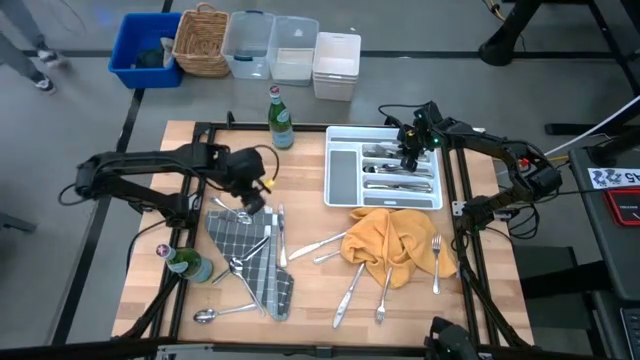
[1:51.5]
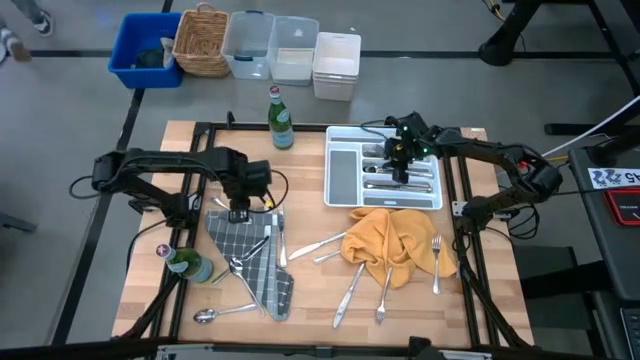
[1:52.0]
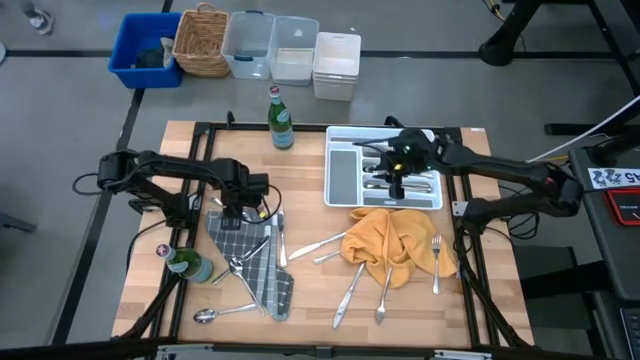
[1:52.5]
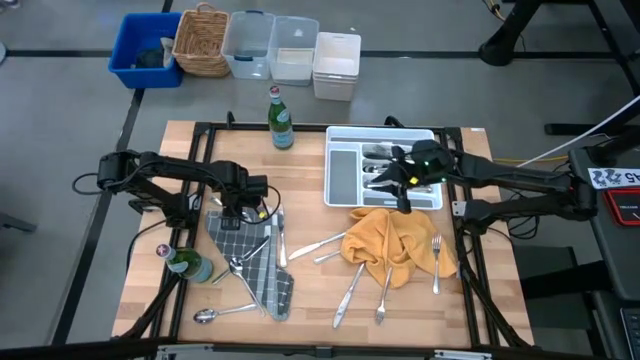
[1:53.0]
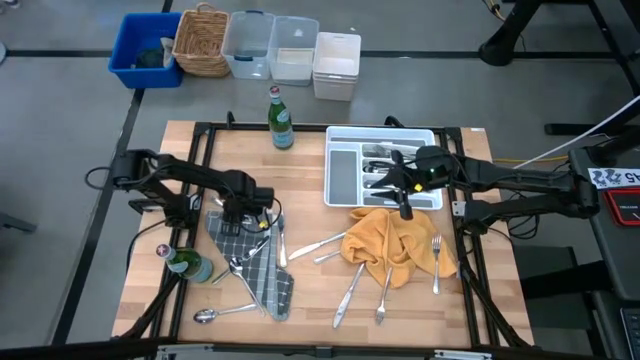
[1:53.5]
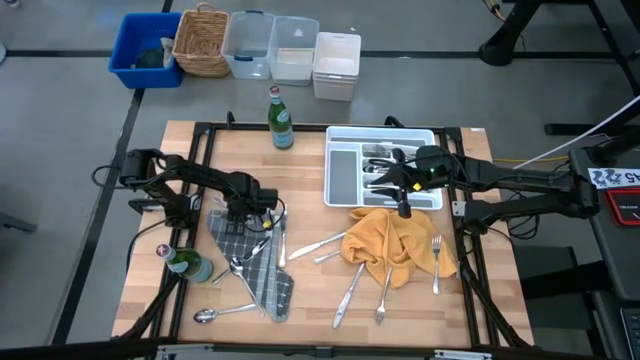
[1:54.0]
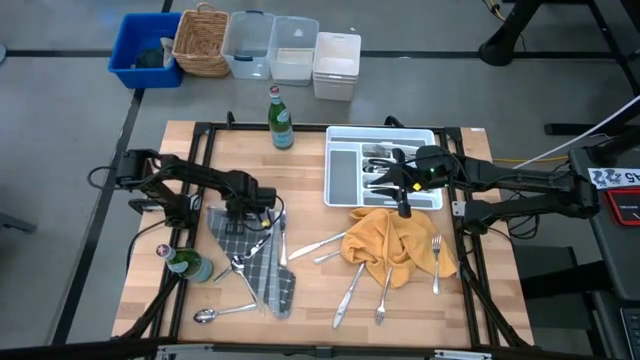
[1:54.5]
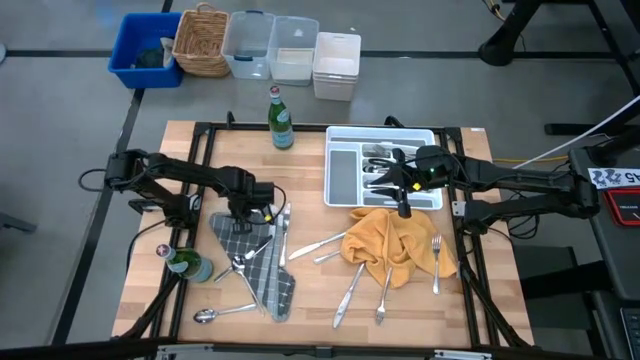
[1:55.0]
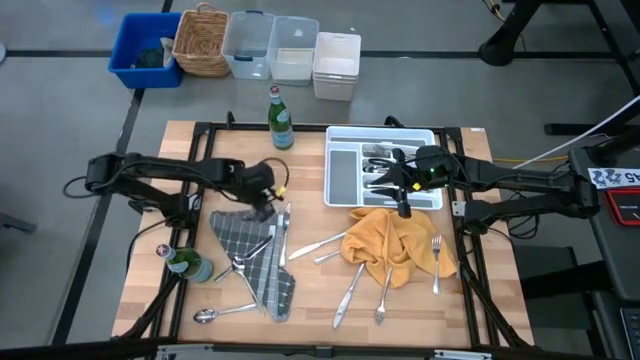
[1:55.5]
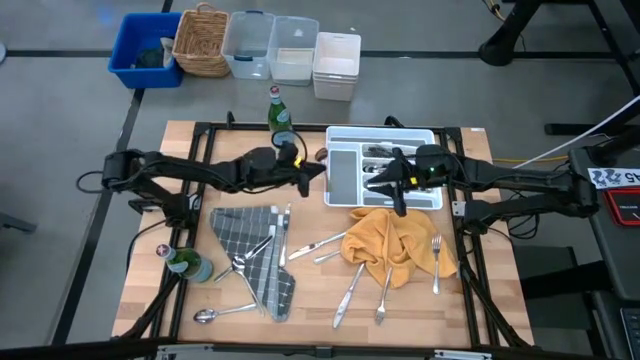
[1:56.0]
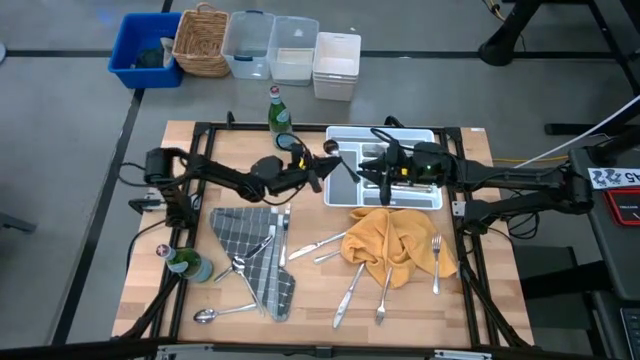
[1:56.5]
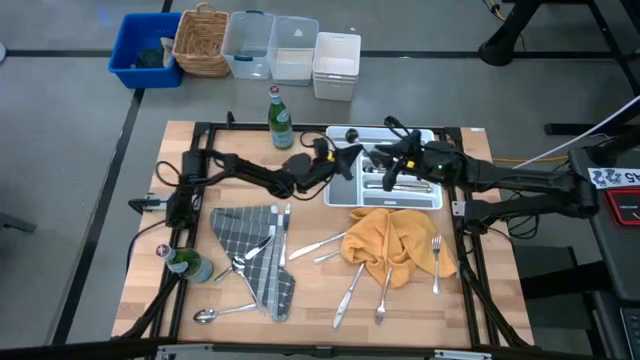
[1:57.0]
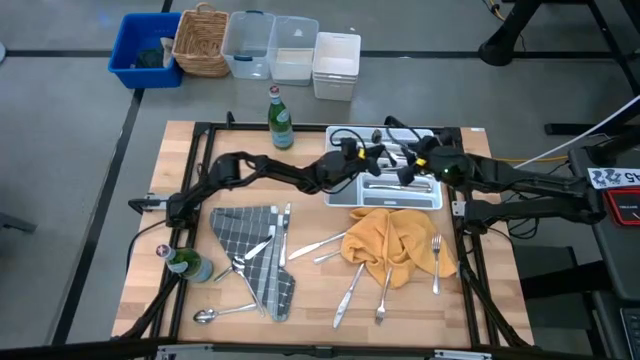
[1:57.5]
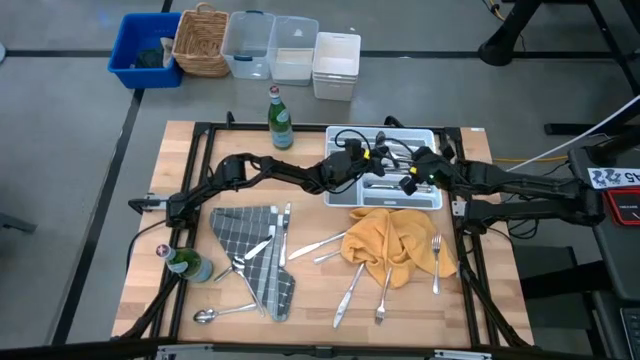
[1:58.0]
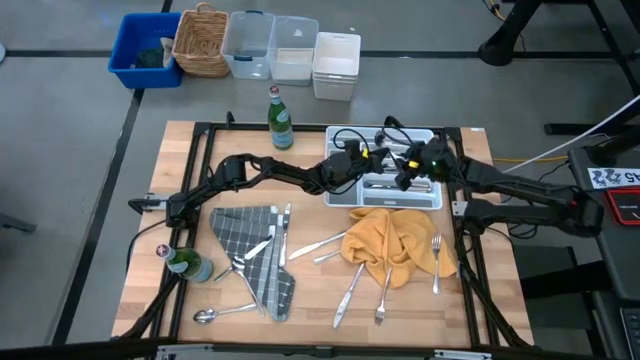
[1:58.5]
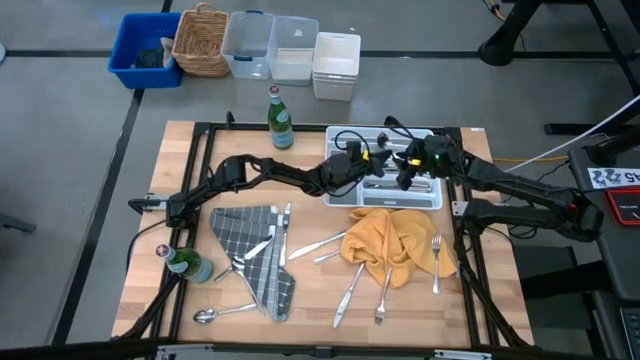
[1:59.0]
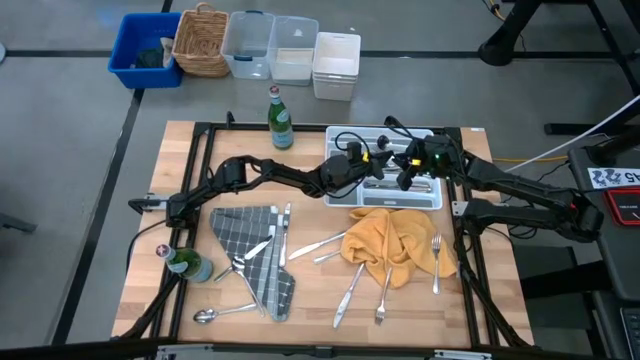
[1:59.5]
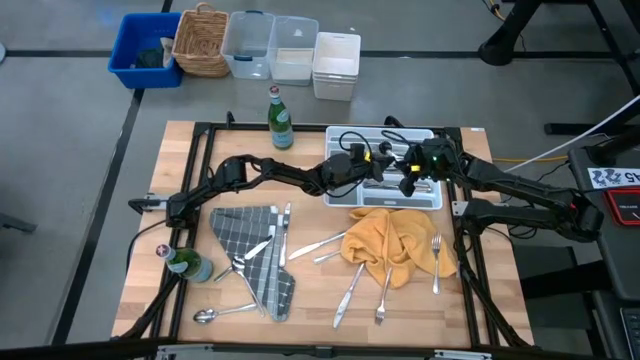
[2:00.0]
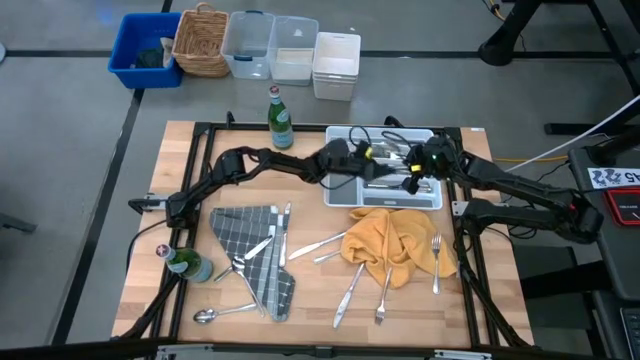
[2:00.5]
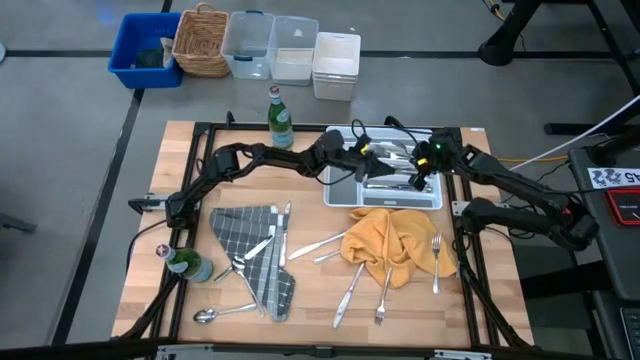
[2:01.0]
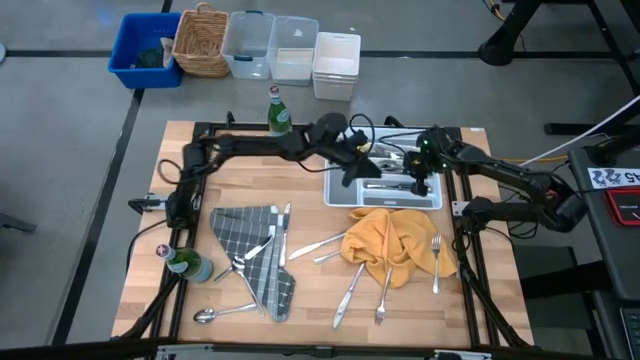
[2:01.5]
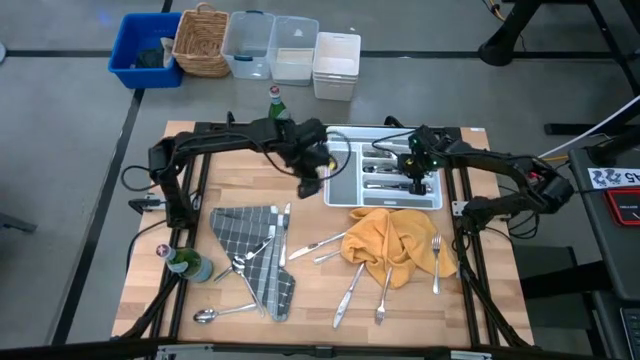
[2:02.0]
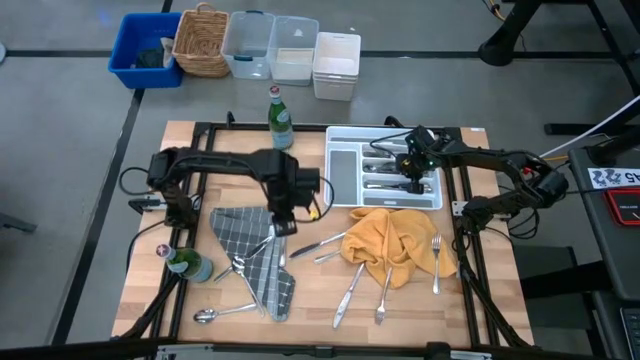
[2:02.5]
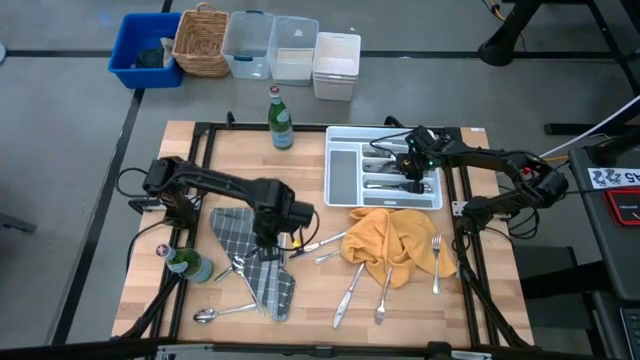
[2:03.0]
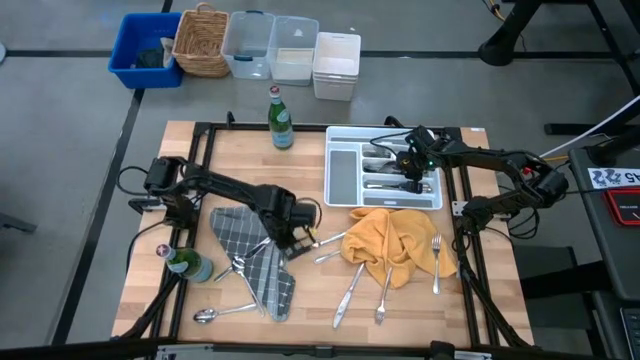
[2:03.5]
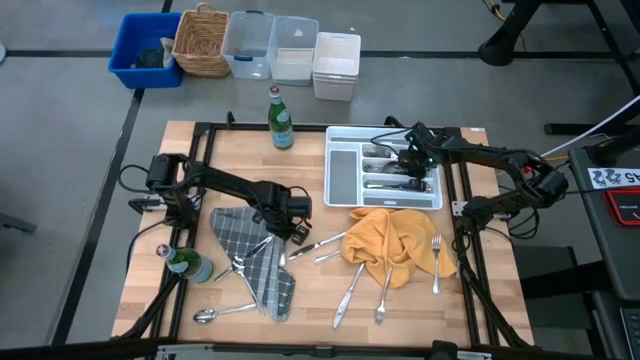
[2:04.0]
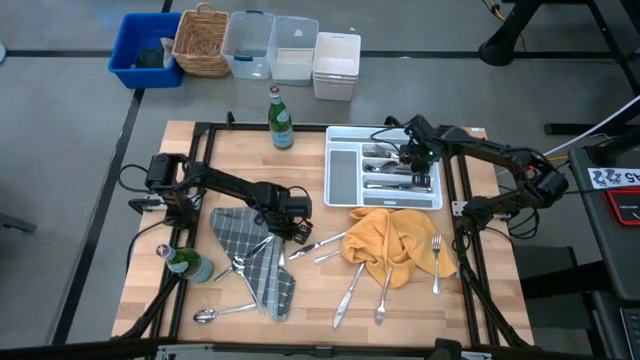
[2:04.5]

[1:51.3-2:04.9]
Put the silver spoon into the cutlery tray

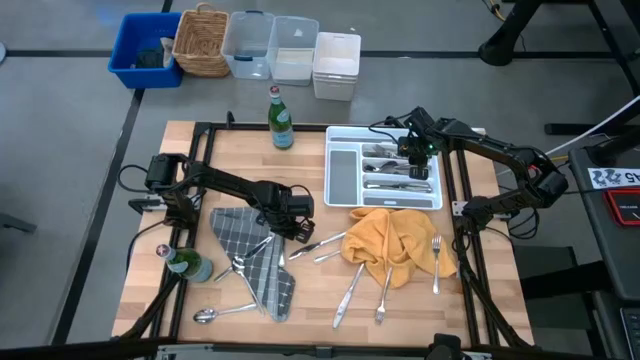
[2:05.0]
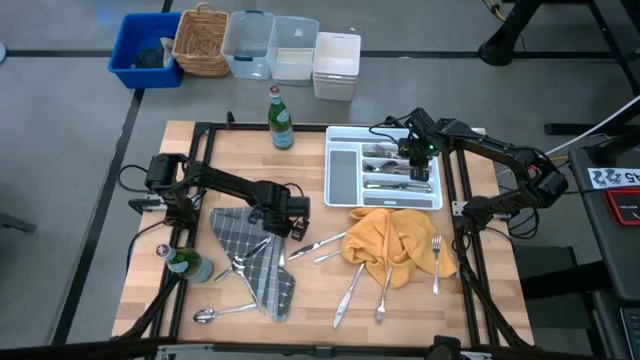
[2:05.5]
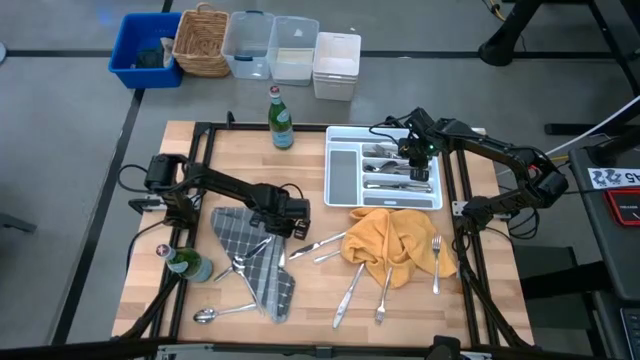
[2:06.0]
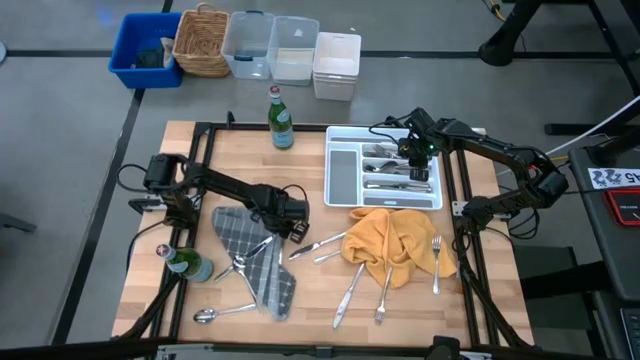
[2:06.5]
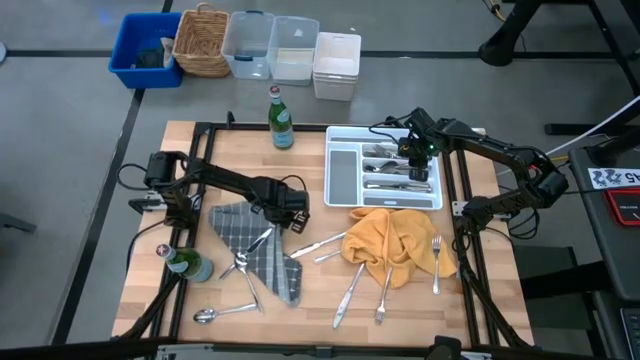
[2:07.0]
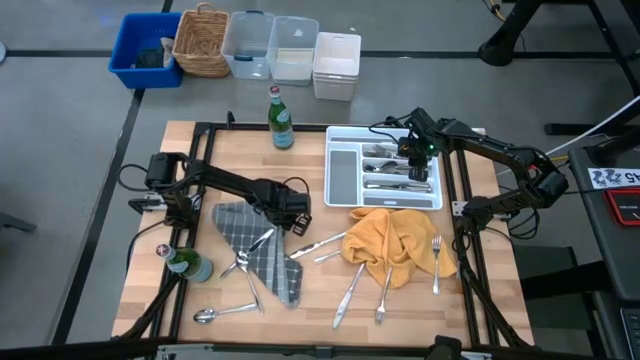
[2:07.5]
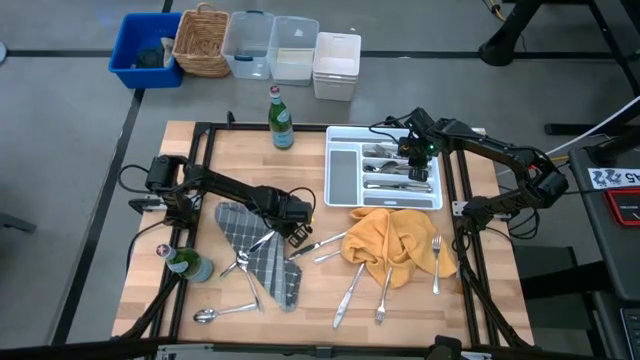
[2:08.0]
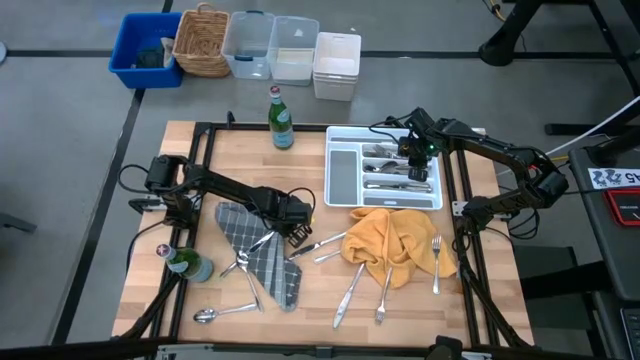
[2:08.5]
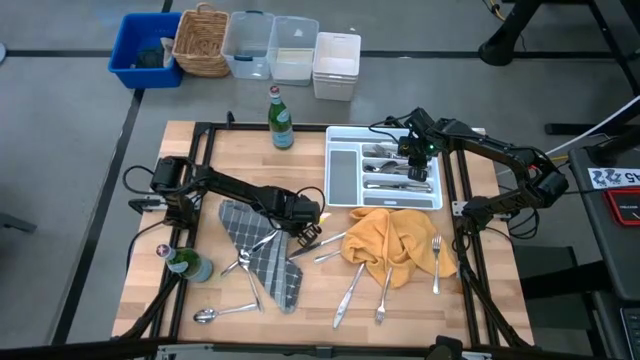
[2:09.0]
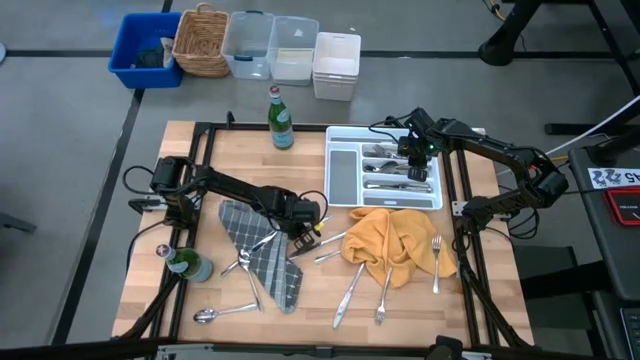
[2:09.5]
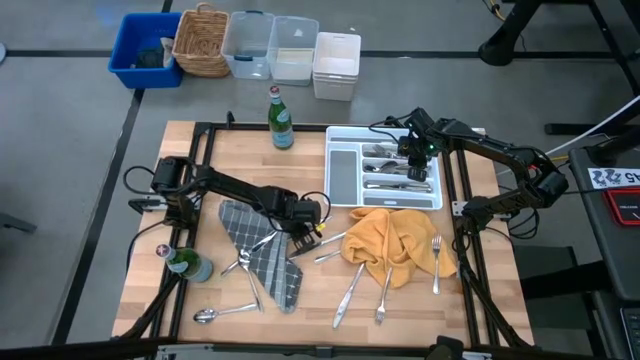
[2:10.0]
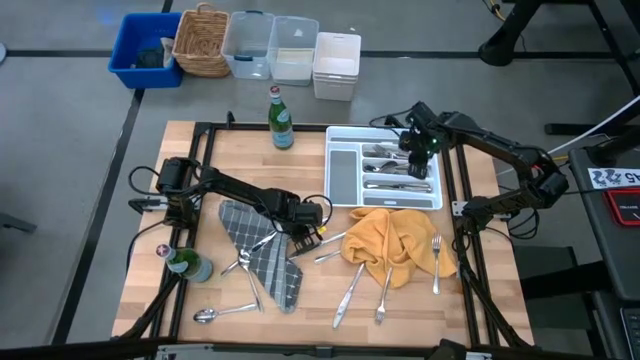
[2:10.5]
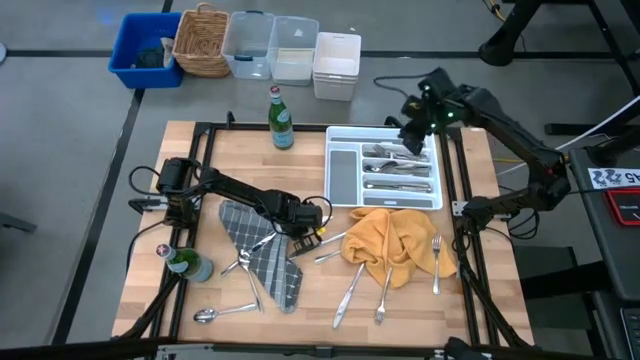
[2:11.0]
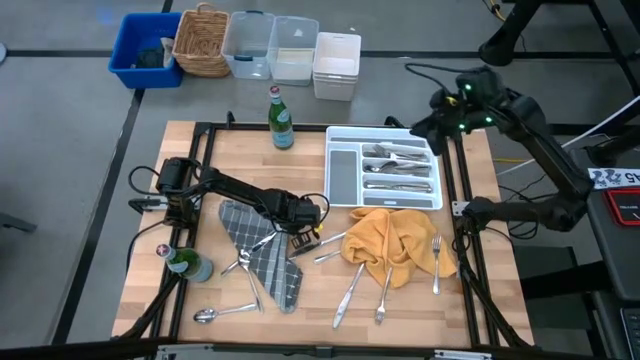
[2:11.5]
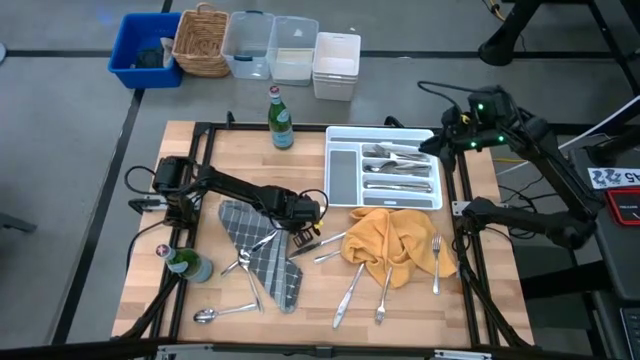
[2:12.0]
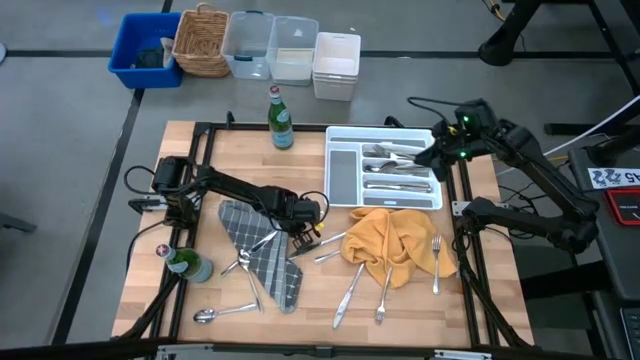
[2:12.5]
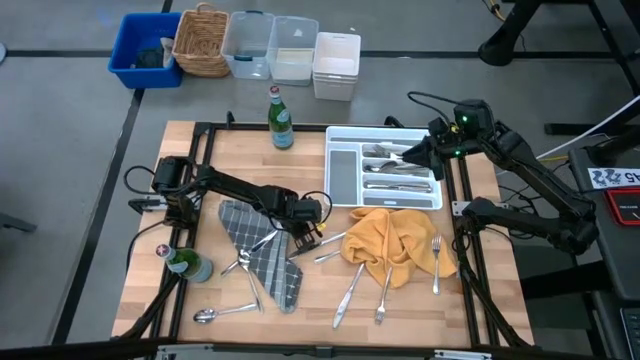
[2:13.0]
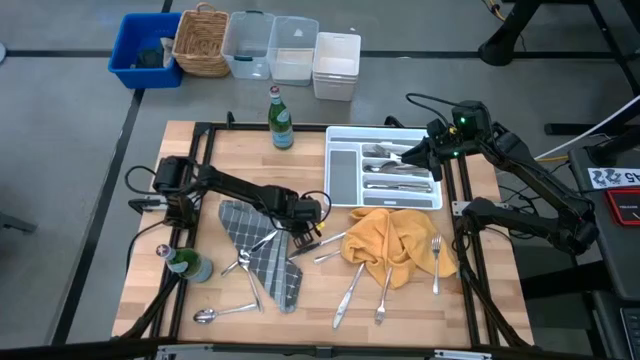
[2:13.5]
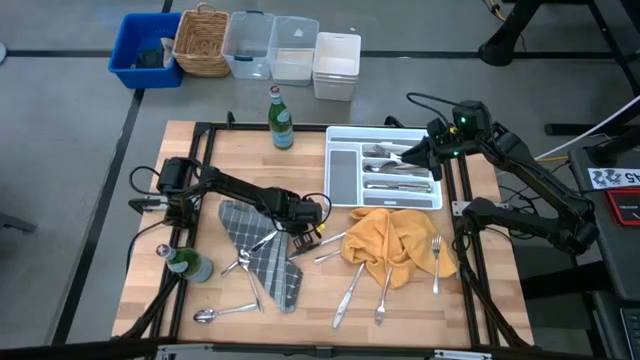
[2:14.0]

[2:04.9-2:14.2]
Put the silver knife into the cutlery tray
